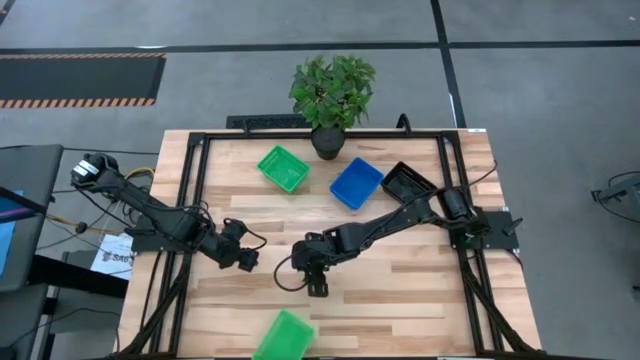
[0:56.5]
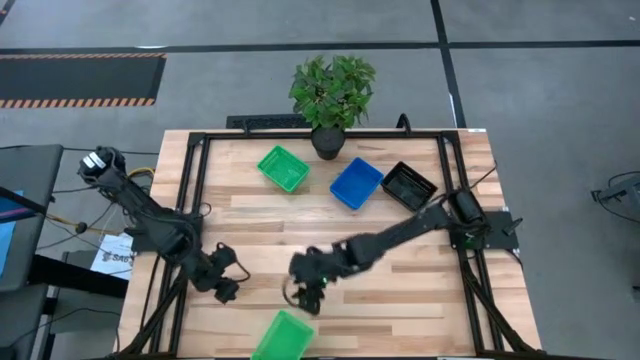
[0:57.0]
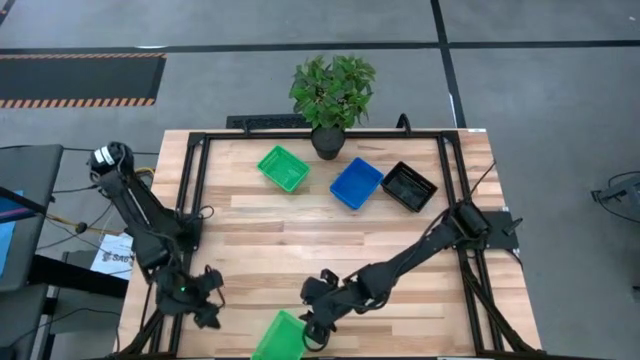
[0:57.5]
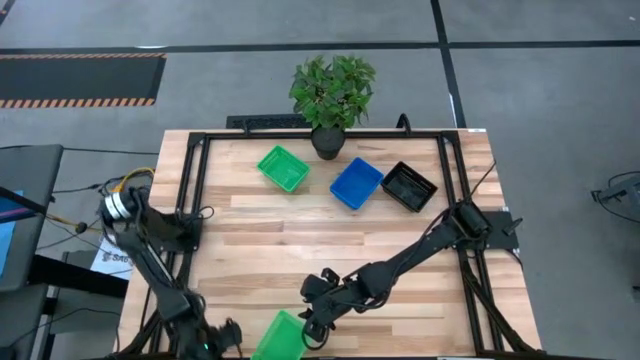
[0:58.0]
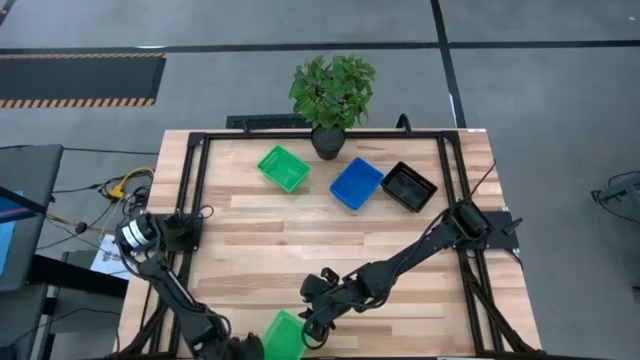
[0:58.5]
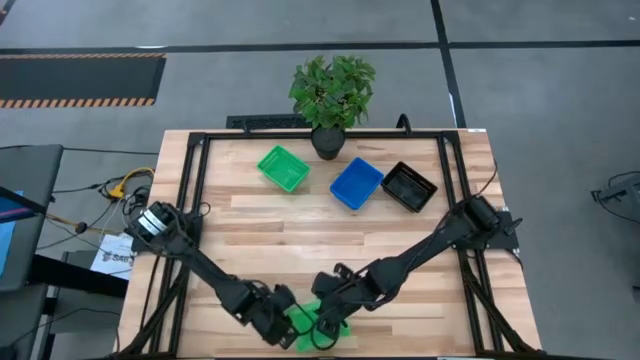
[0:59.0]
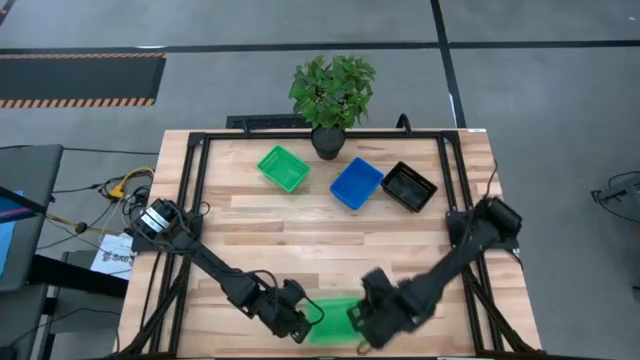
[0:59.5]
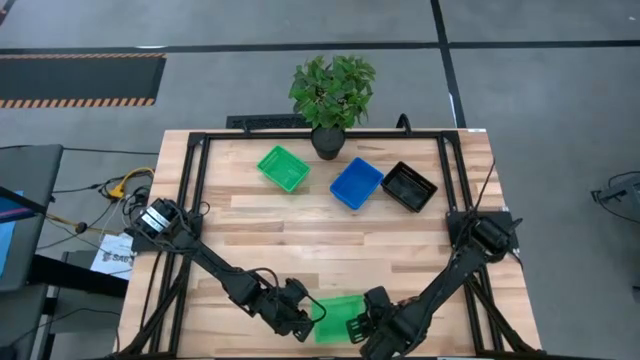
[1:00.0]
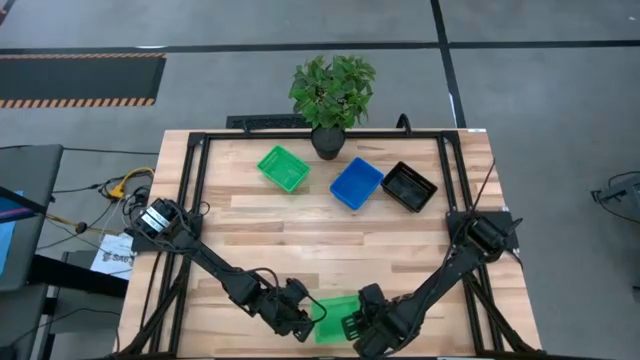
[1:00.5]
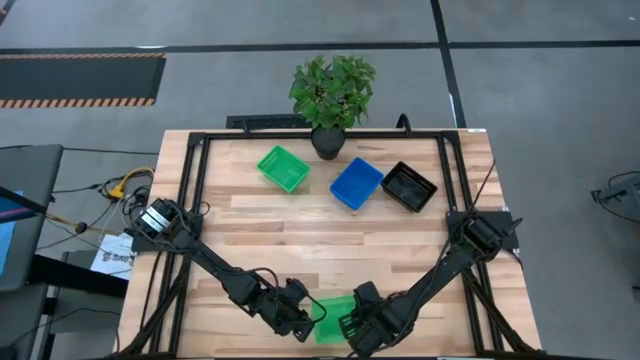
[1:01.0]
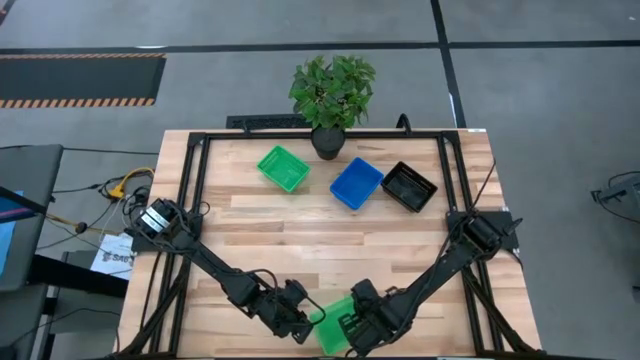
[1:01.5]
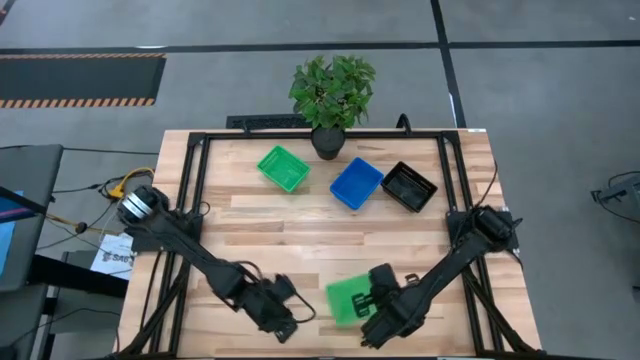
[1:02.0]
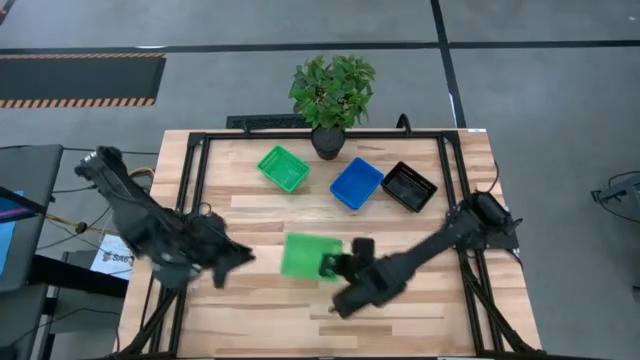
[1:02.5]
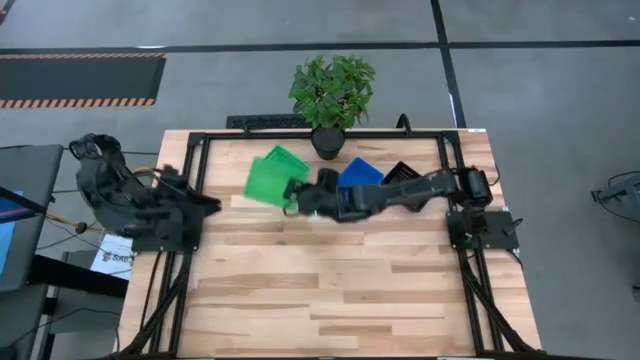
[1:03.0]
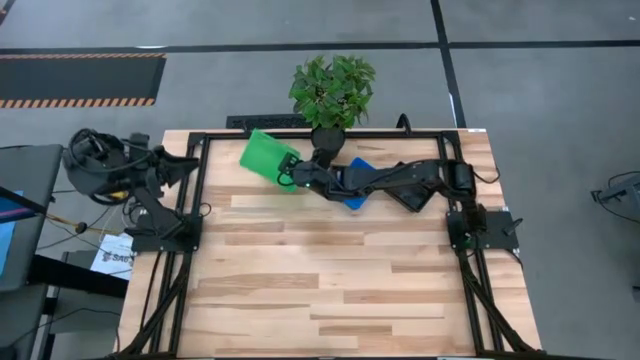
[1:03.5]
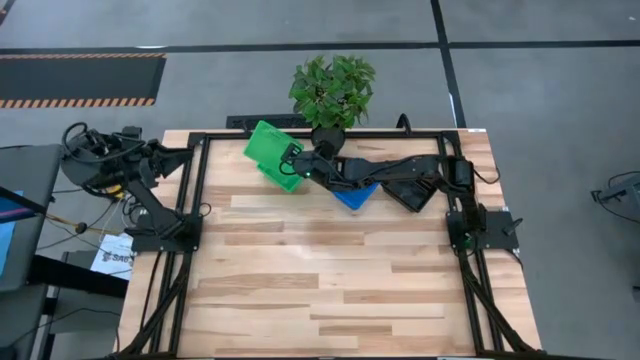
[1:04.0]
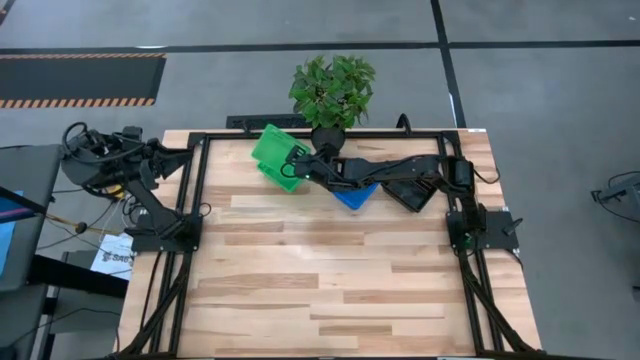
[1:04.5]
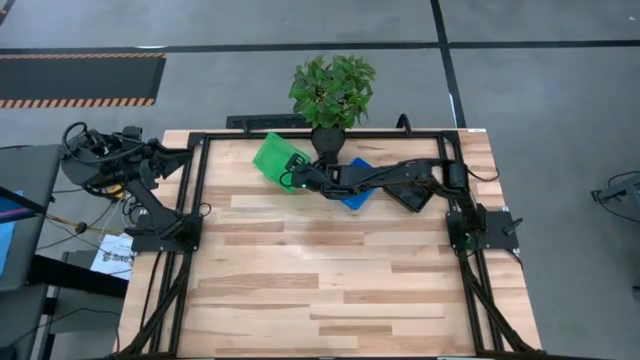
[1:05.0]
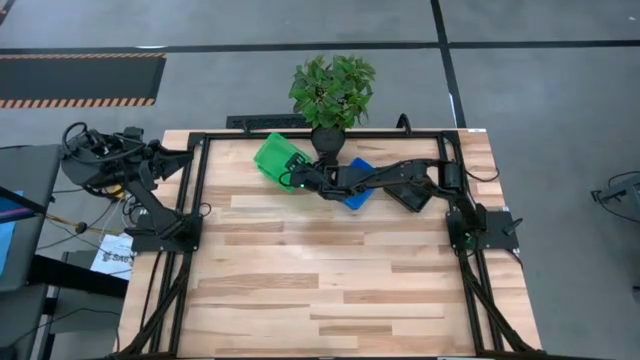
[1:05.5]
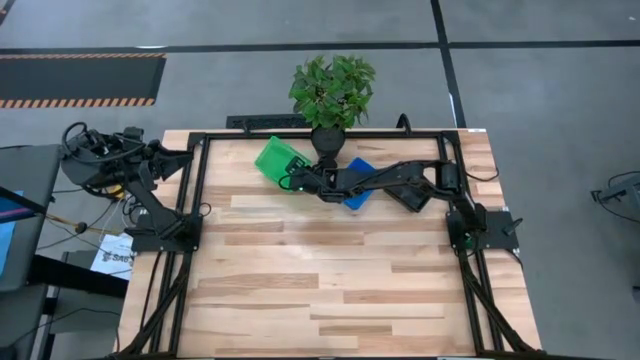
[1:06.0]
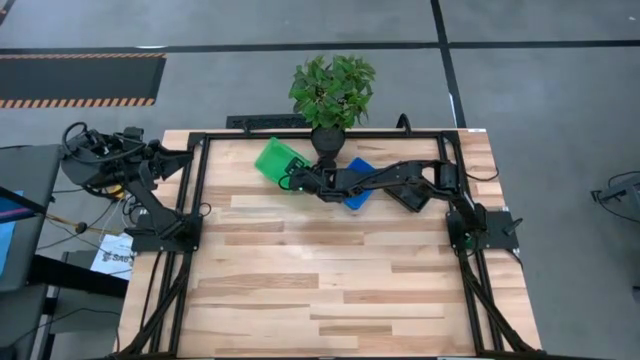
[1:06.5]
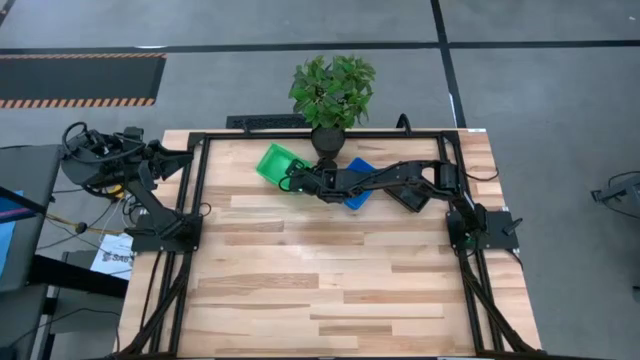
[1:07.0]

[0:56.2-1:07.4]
Stack the bottom green basket on the top green basket

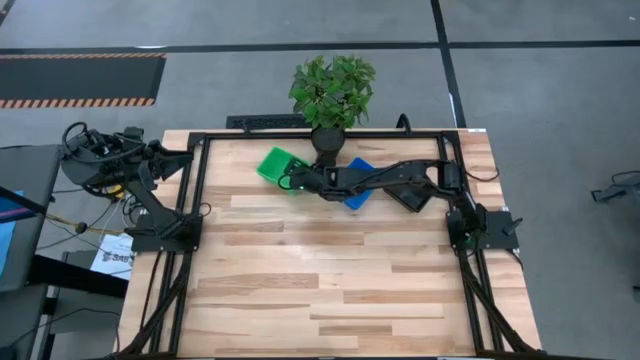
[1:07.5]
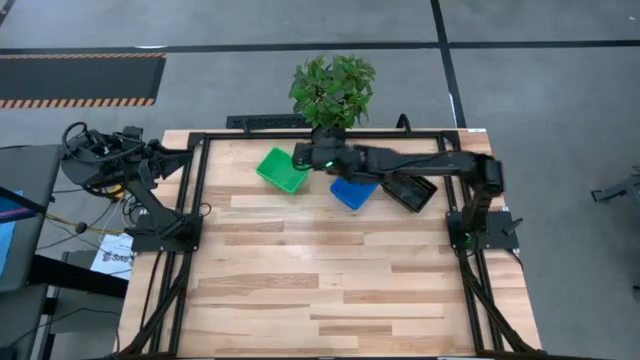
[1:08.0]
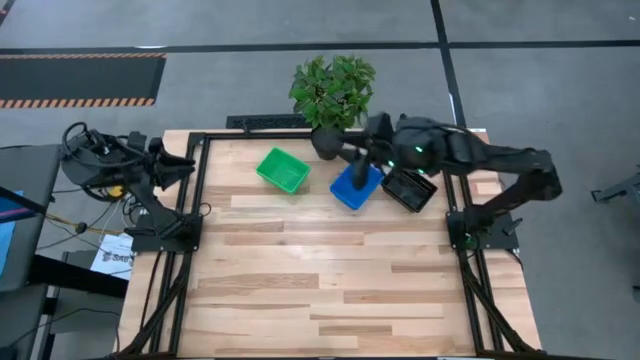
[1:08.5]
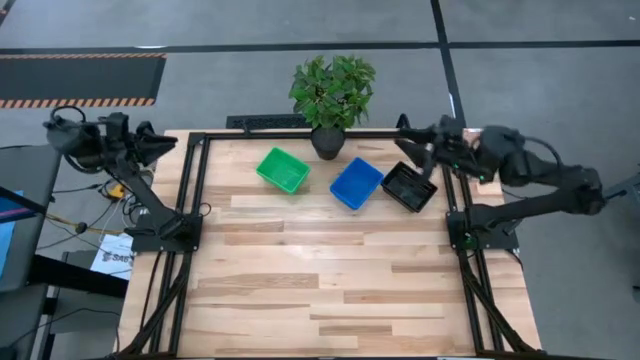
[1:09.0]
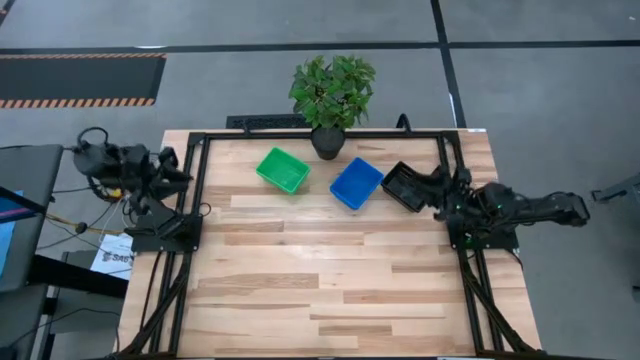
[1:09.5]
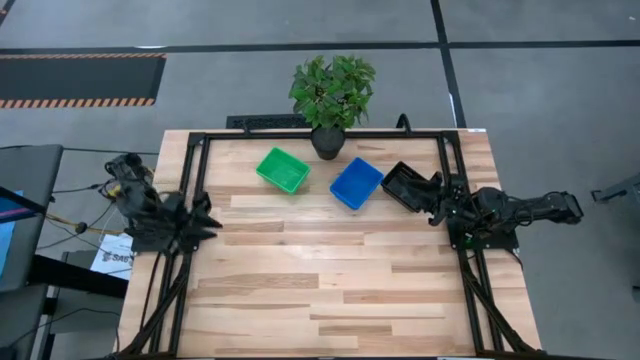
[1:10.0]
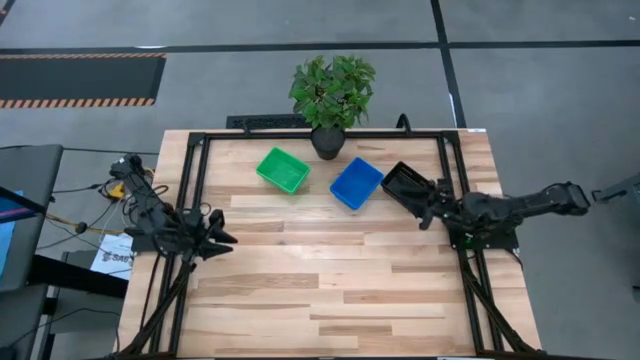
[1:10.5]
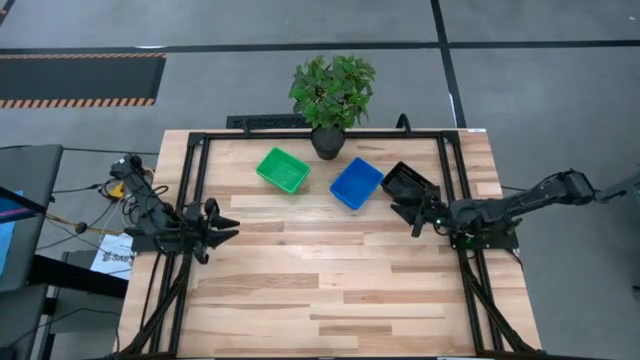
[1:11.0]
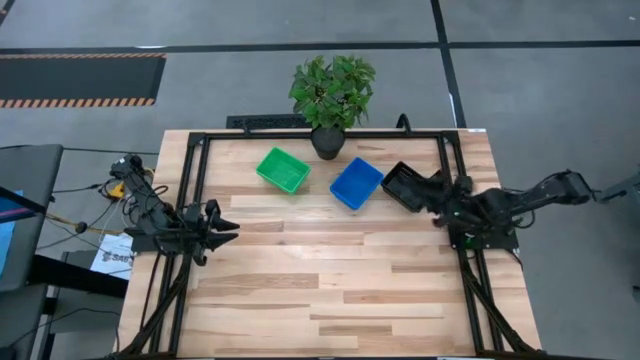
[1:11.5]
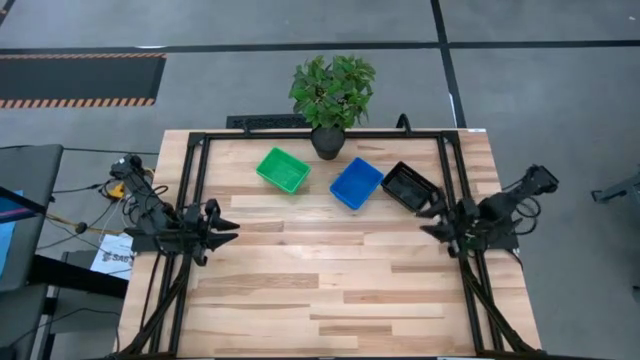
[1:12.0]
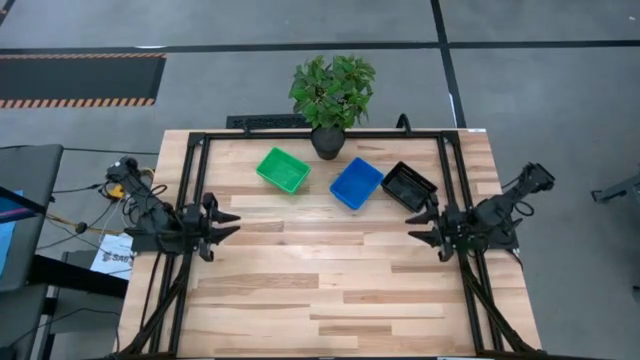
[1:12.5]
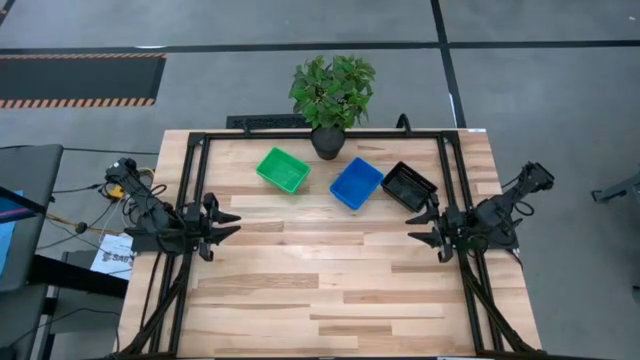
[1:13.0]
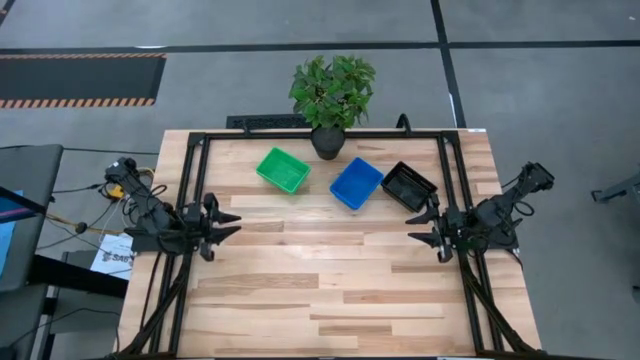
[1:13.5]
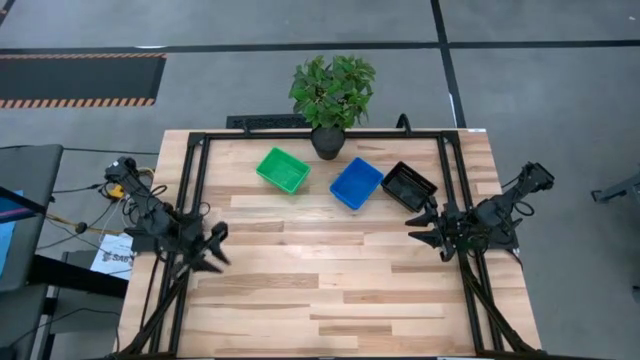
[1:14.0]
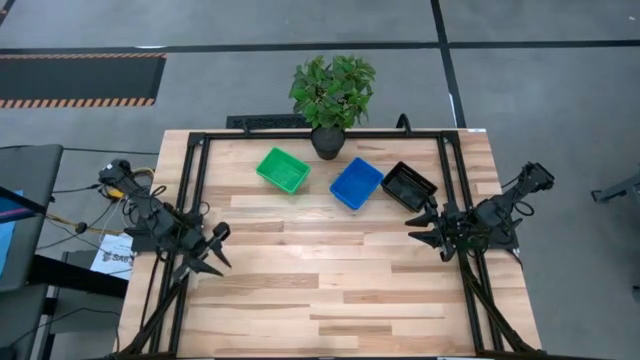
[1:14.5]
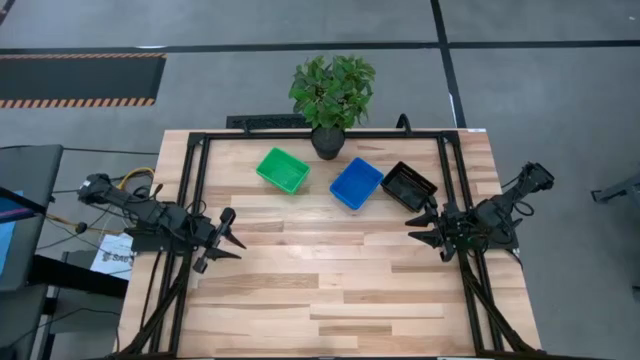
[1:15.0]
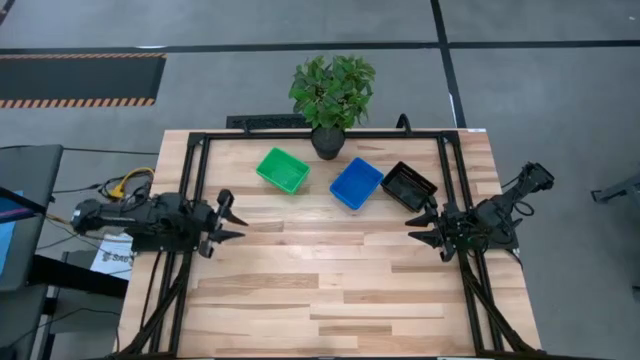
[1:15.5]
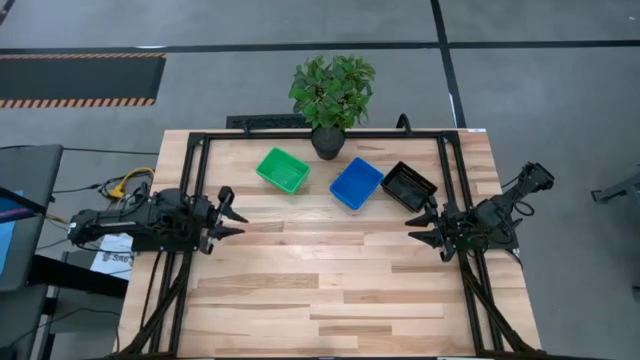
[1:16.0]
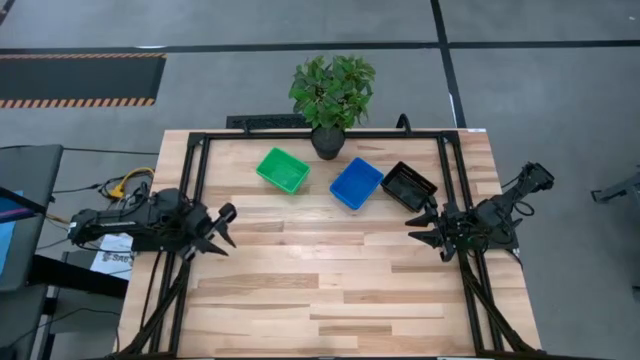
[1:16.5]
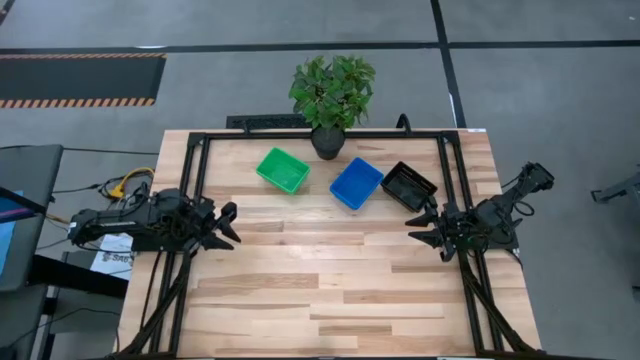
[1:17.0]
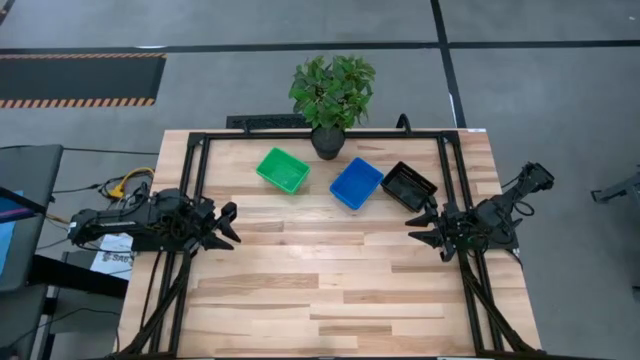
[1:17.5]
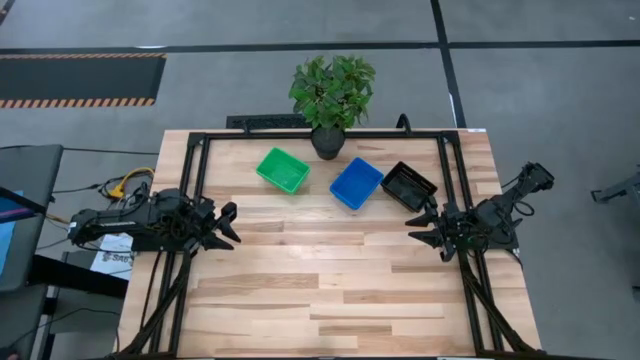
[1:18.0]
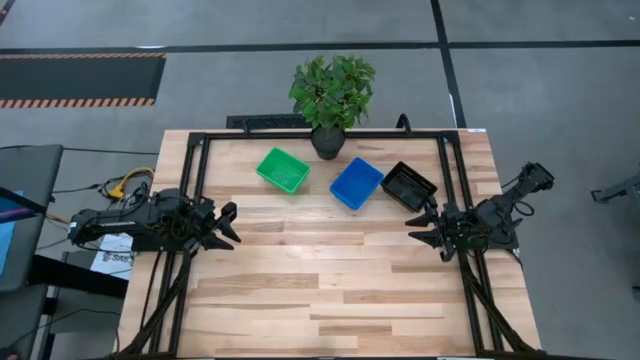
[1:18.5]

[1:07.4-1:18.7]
Return to Home Position
